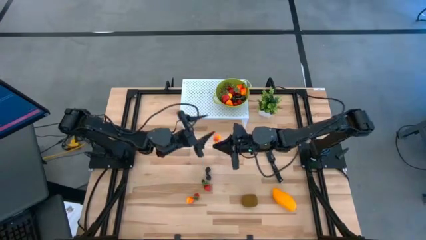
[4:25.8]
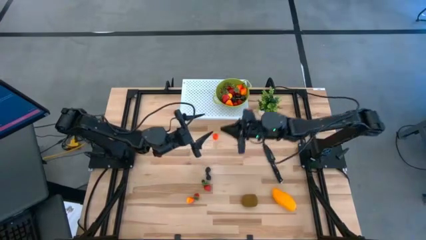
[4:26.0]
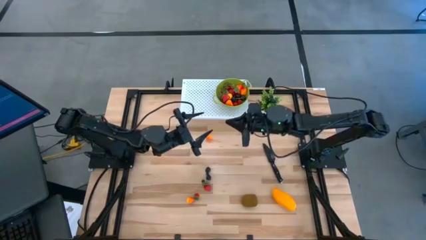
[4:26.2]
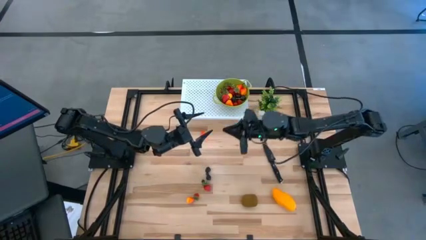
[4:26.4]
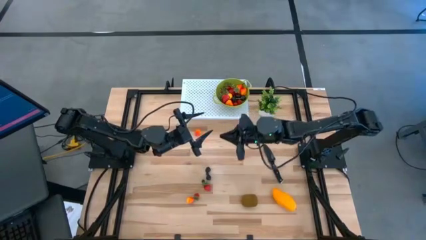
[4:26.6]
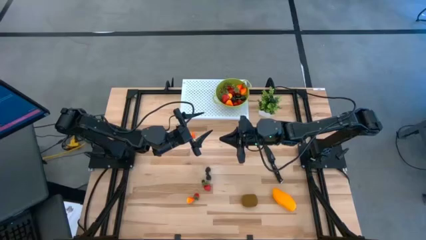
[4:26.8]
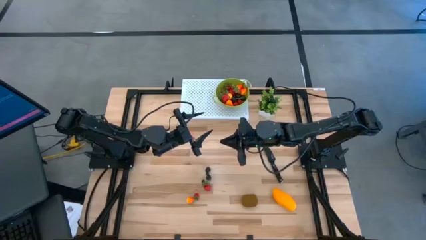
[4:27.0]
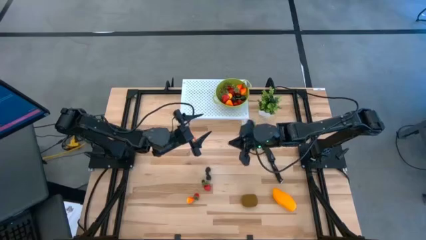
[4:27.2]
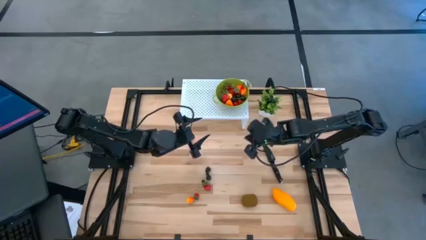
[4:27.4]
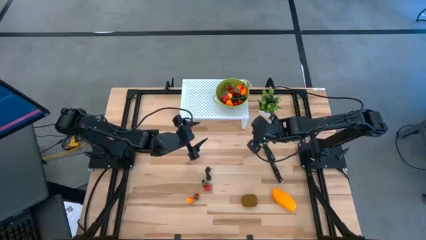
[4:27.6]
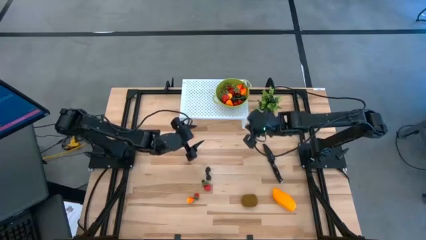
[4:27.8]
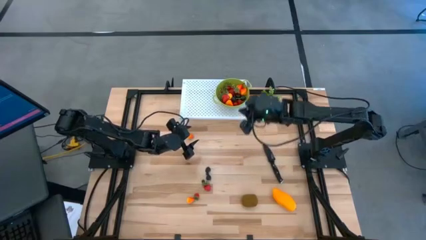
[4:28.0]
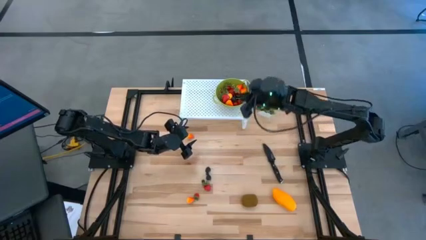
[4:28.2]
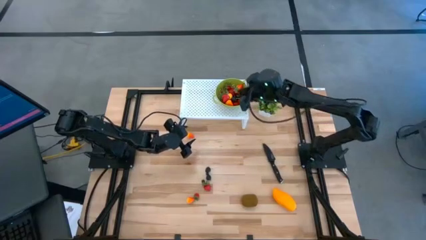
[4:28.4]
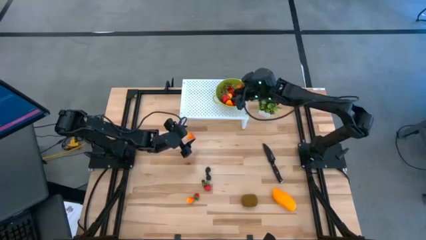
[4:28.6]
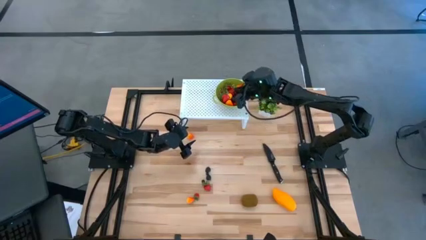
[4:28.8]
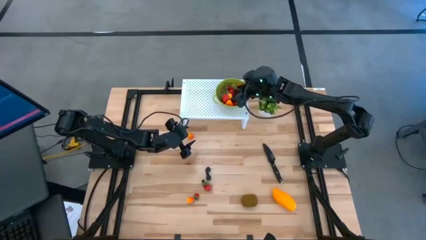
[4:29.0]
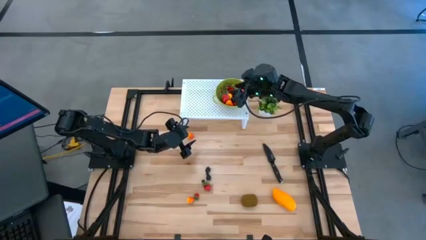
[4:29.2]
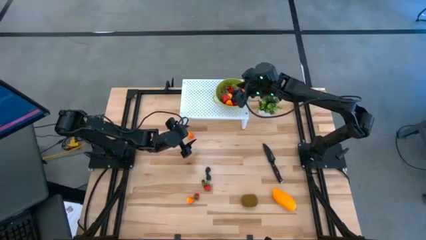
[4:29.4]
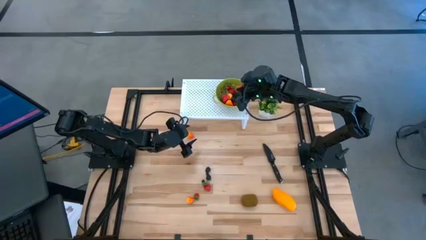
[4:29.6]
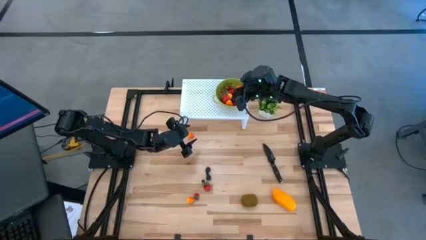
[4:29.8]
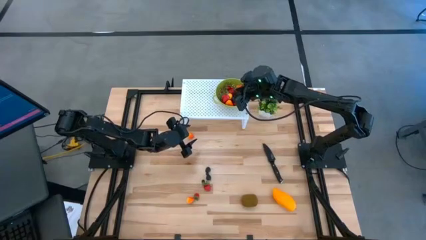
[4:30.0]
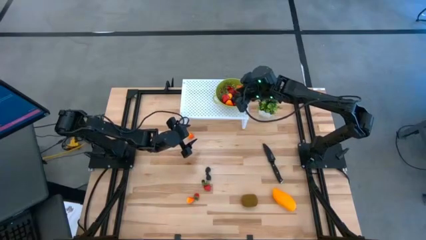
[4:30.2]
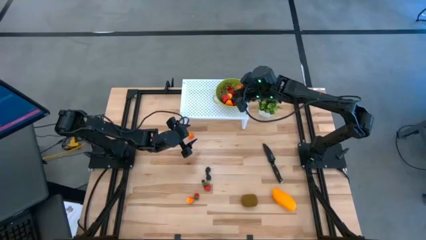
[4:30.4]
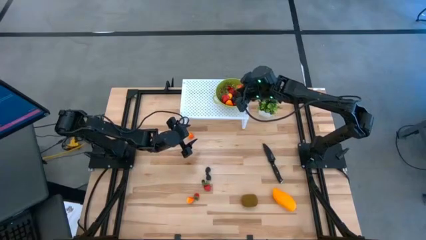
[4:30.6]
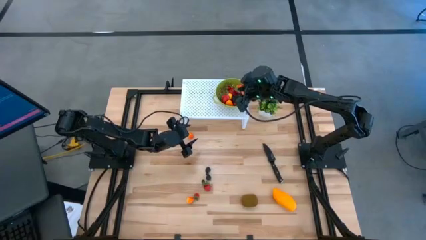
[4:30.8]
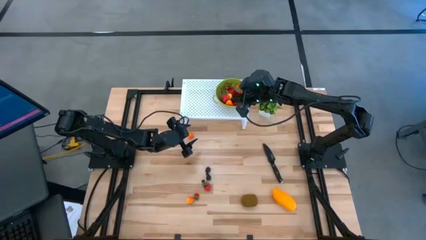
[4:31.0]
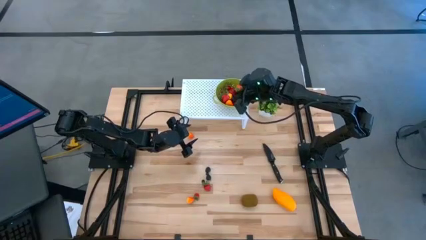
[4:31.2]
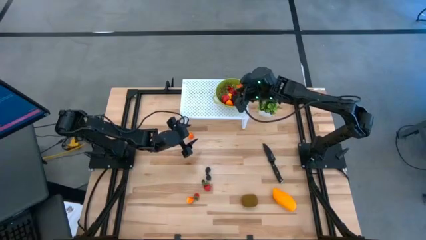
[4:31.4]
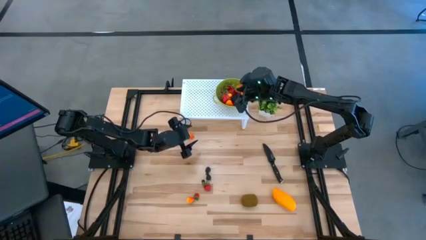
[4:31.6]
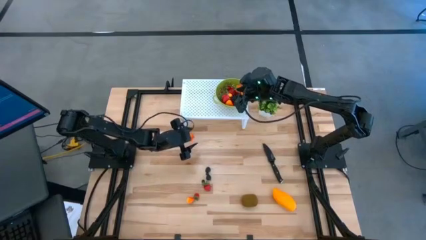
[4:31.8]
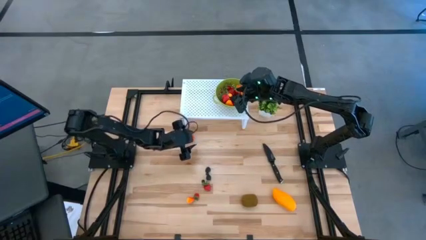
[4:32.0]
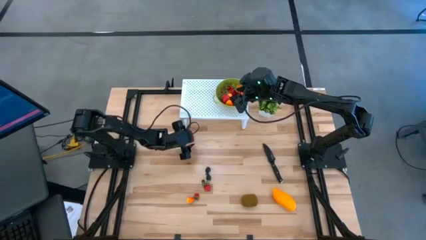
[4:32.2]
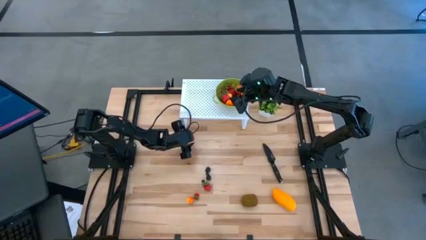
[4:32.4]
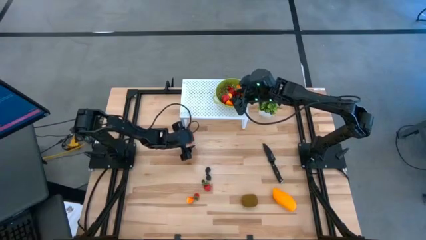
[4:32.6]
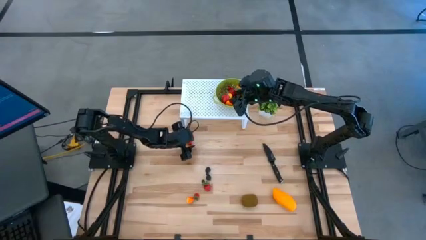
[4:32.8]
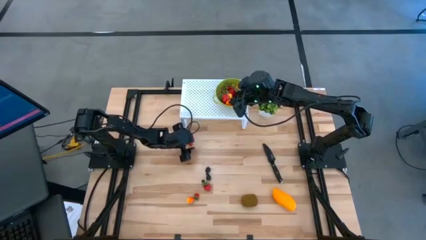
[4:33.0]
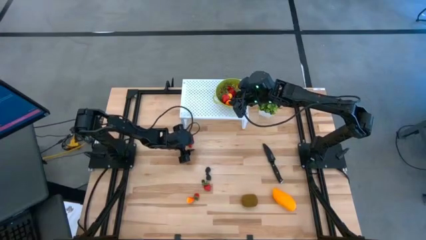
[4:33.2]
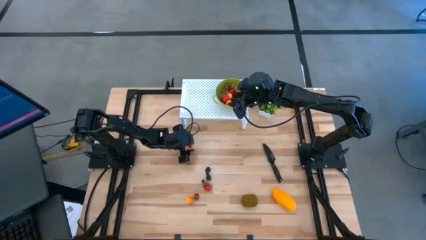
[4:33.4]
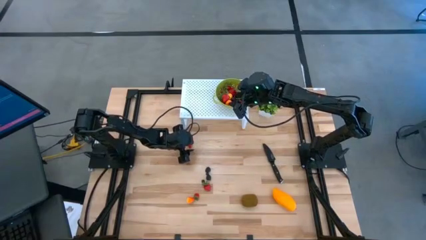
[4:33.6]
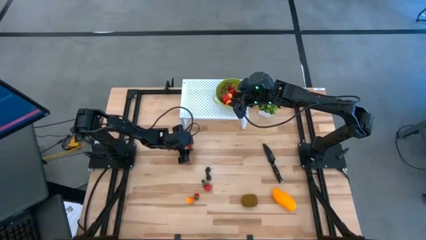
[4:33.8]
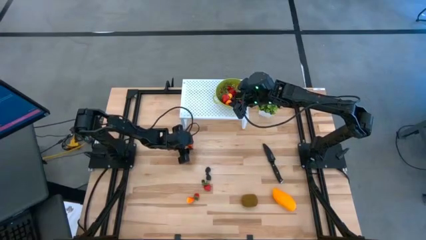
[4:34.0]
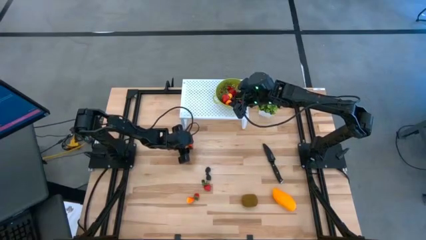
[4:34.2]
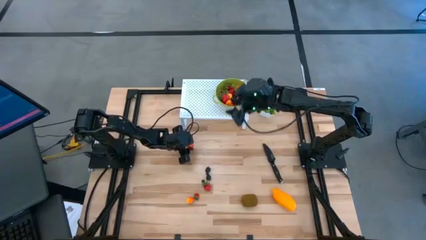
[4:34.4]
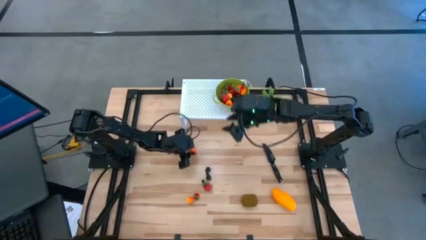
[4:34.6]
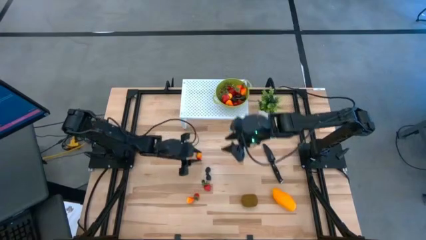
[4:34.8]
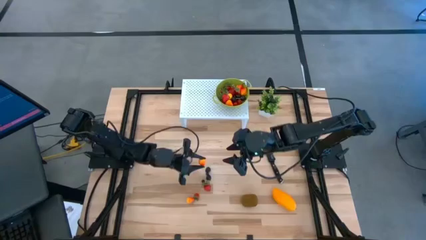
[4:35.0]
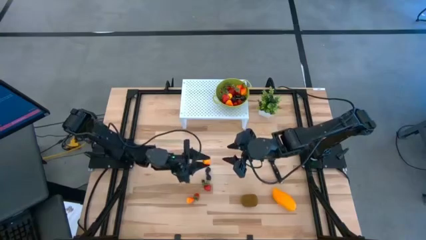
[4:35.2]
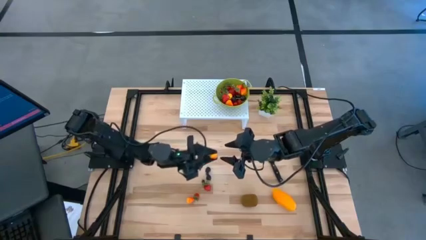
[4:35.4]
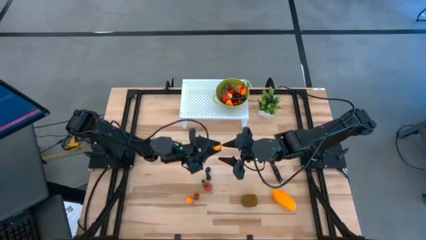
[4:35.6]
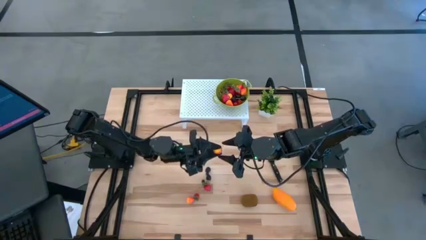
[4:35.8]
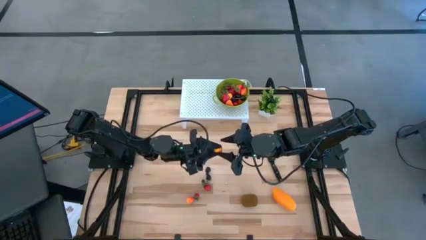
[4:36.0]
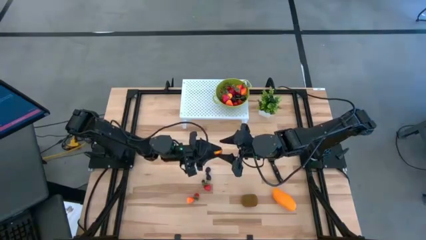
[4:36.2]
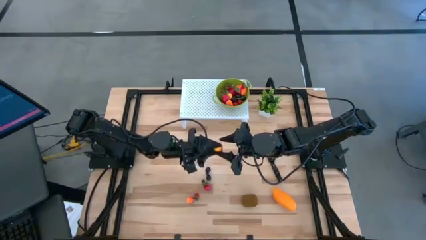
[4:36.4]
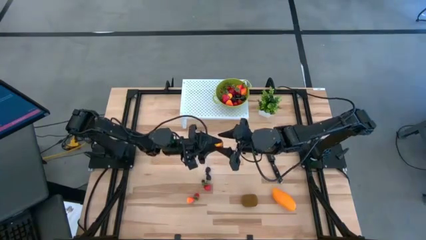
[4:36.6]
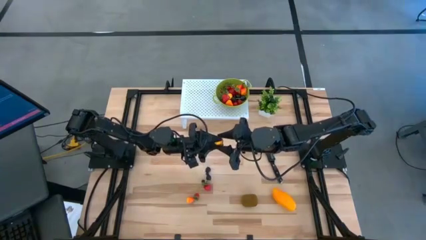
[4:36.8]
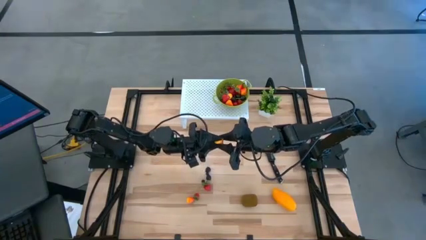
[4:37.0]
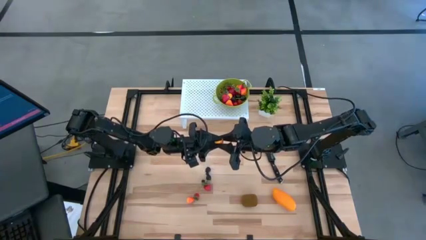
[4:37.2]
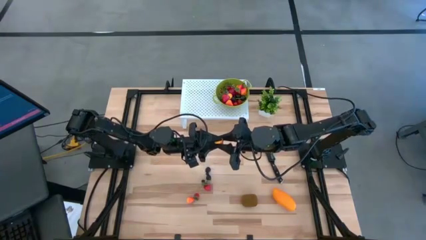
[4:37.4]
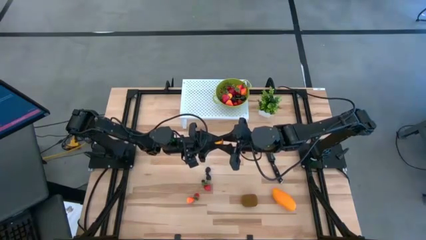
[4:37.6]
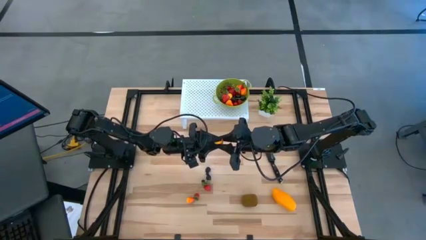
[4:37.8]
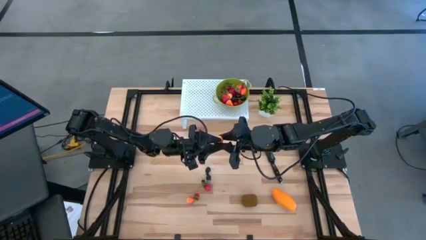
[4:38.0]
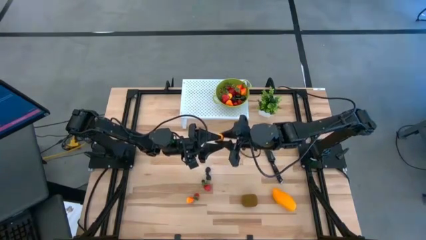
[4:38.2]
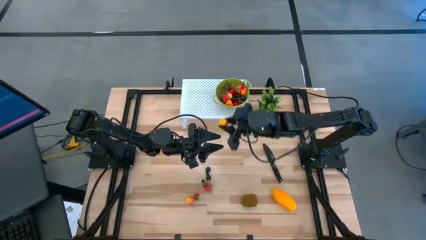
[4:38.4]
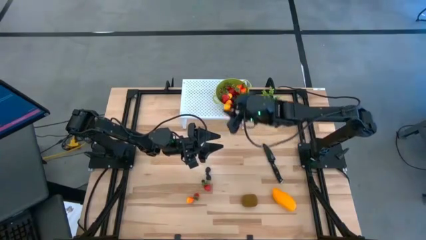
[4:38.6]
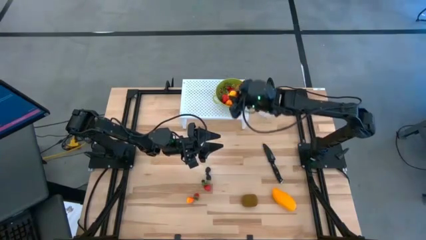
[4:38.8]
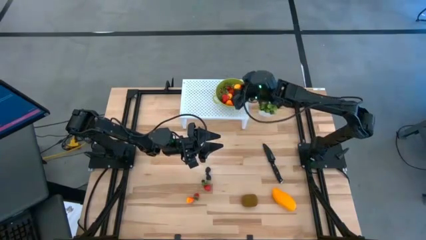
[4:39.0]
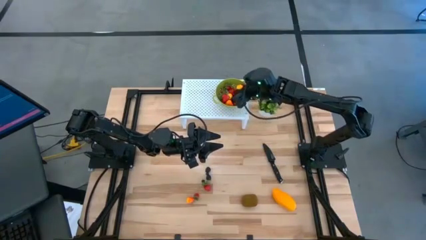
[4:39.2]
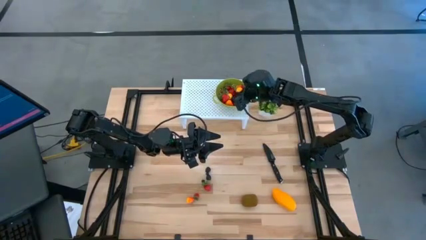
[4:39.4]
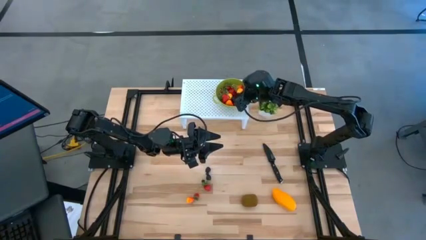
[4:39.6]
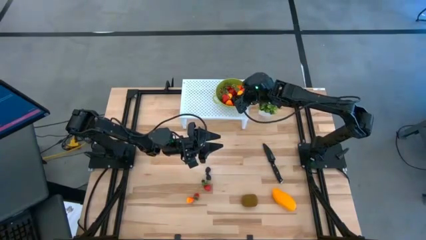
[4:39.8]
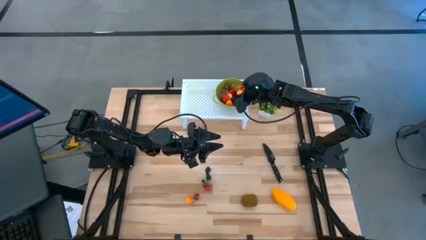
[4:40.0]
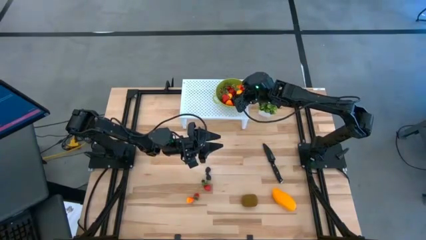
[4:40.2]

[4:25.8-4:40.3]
Task: Pick & Place Fruit
Put the orange pear into the green strainer bowl
